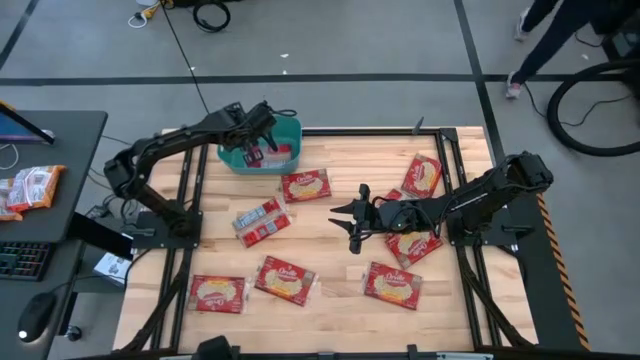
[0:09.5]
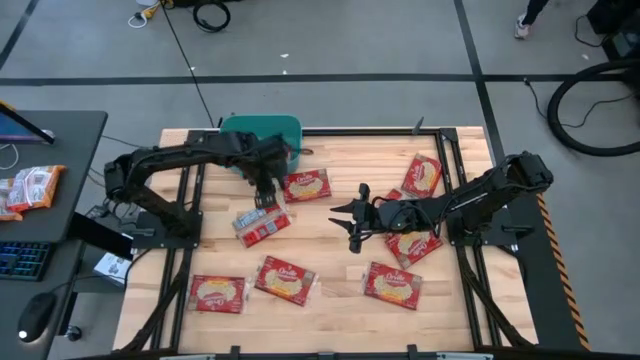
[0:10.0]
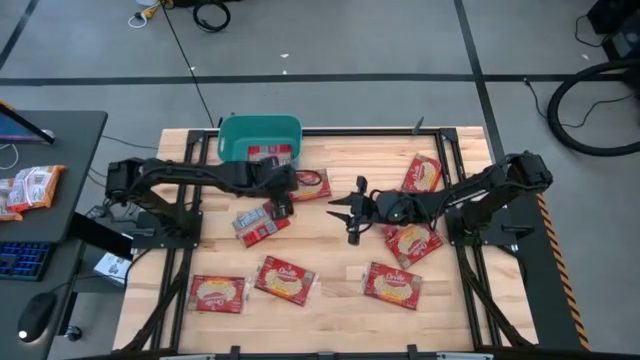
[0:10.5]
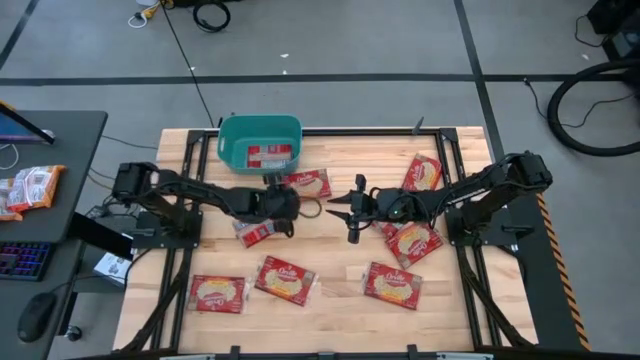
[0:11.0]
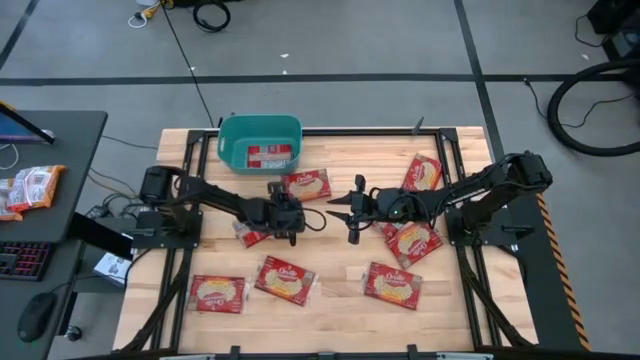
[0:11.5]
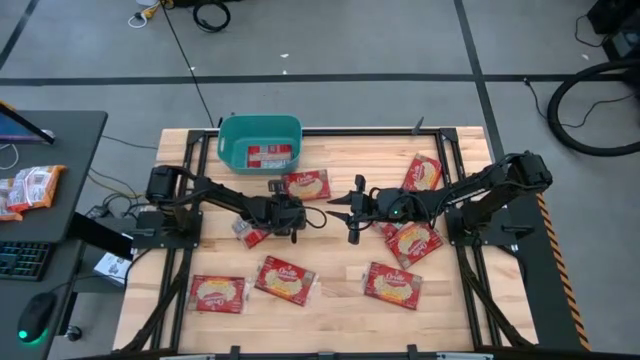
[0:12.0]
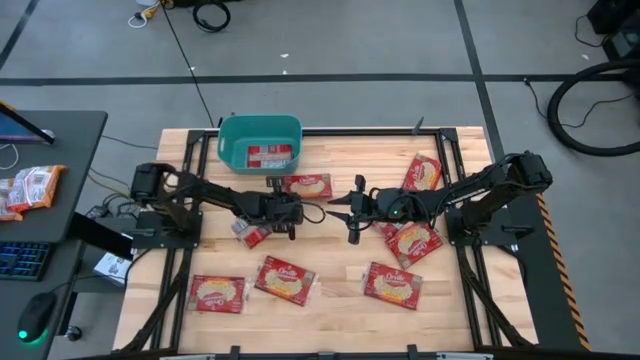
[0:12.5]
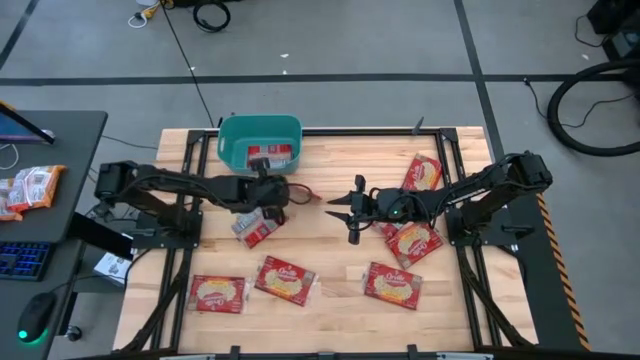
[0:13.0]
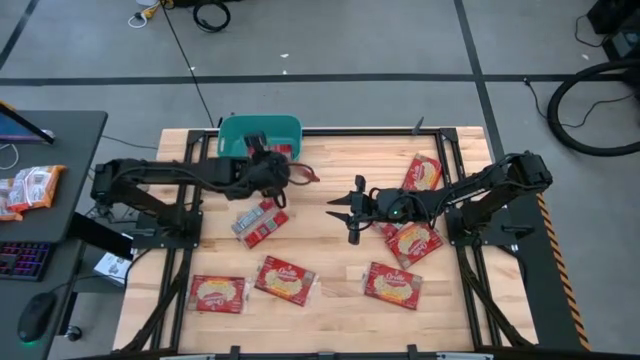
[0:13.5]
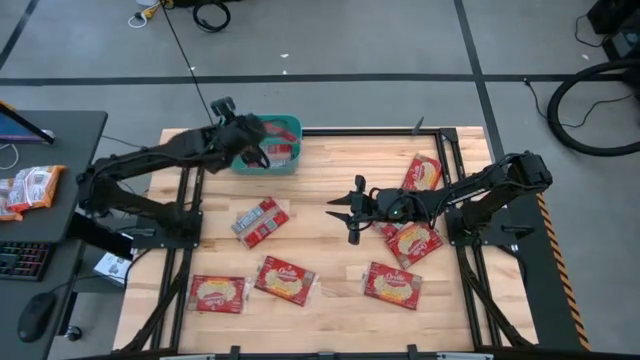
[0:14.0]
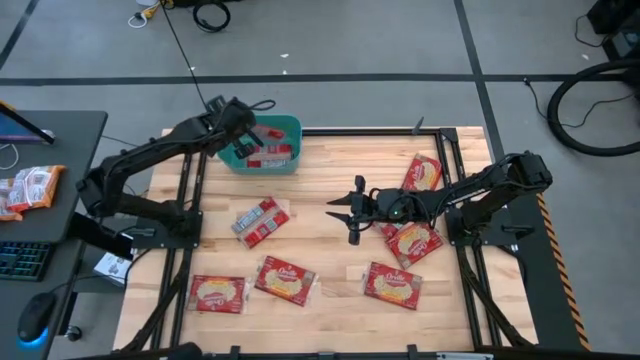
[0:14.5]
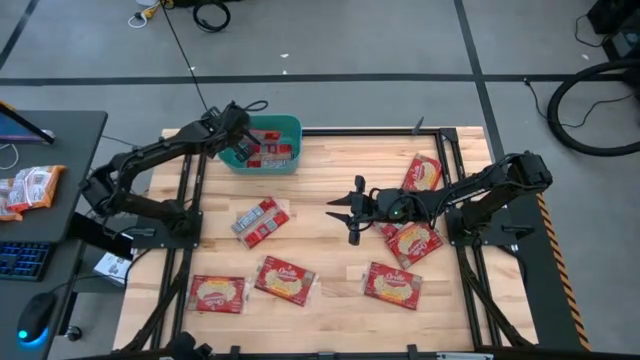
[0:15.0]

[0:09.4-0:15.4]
Task: Sort popcorn bags into baskets
Put the popcorn bag into the bin

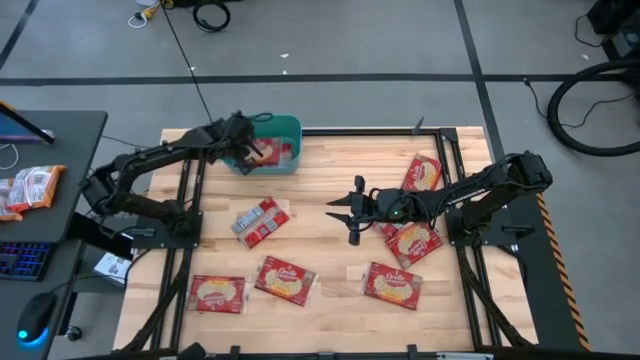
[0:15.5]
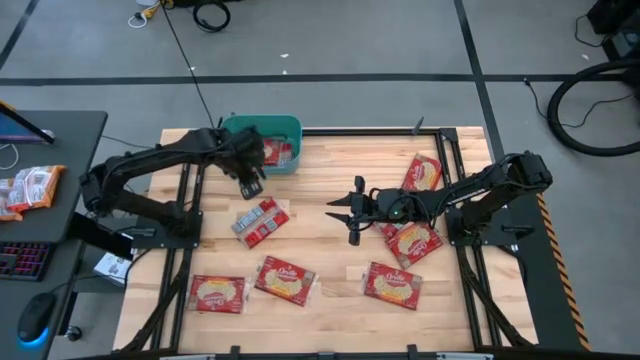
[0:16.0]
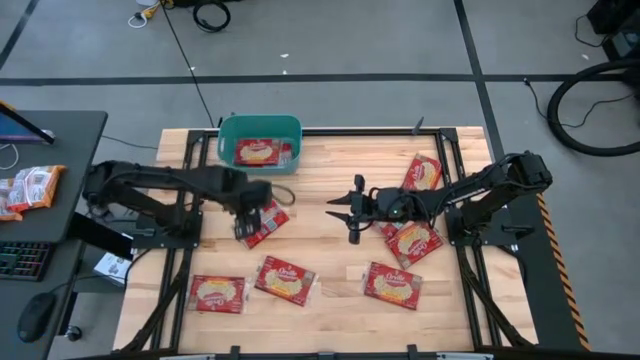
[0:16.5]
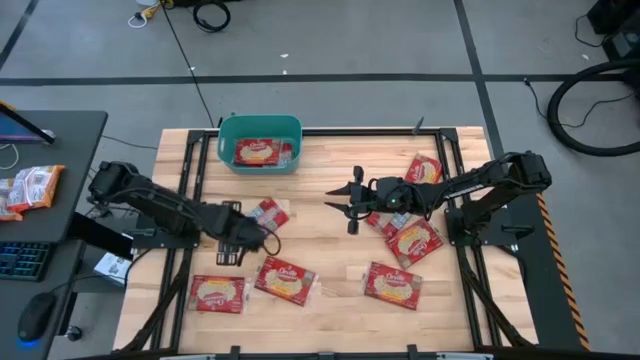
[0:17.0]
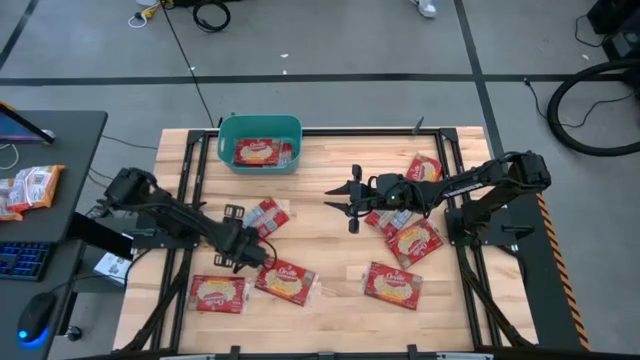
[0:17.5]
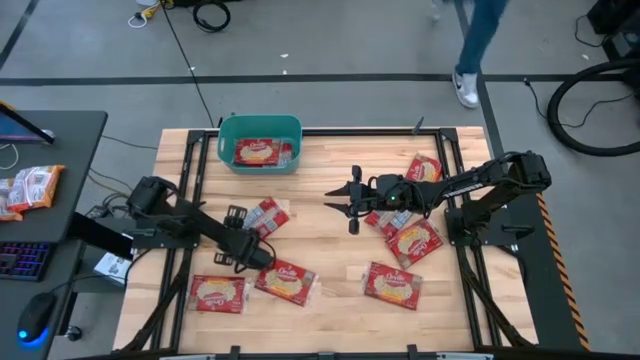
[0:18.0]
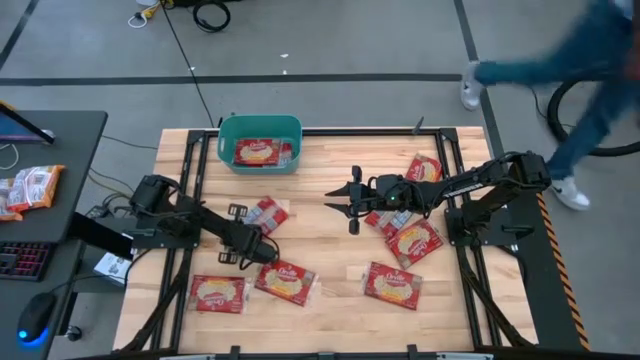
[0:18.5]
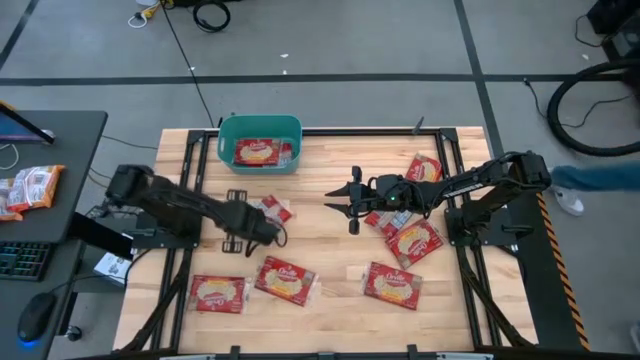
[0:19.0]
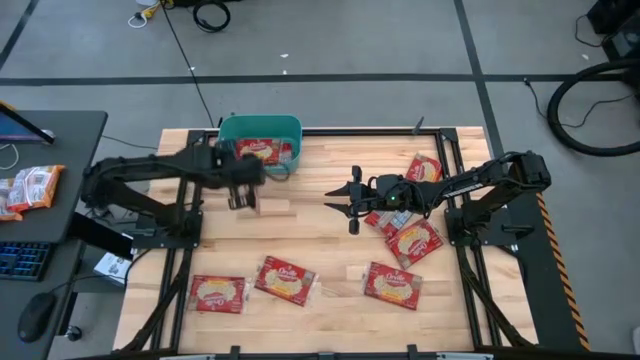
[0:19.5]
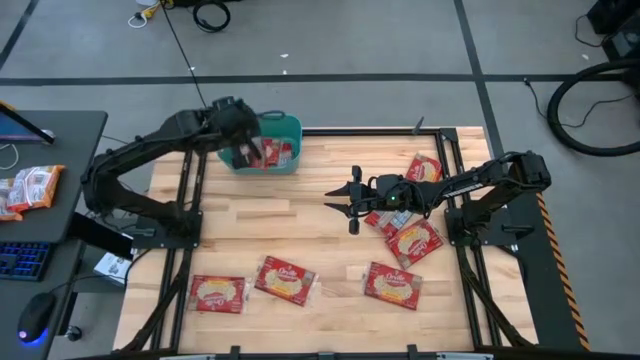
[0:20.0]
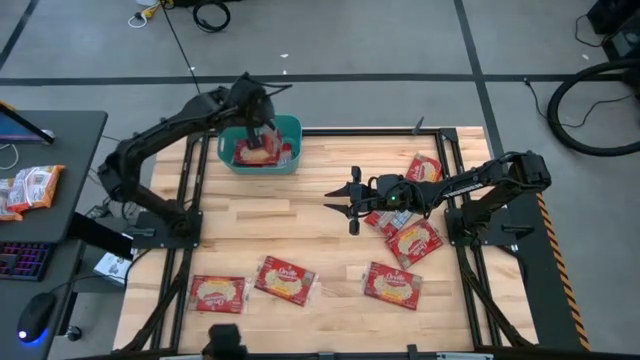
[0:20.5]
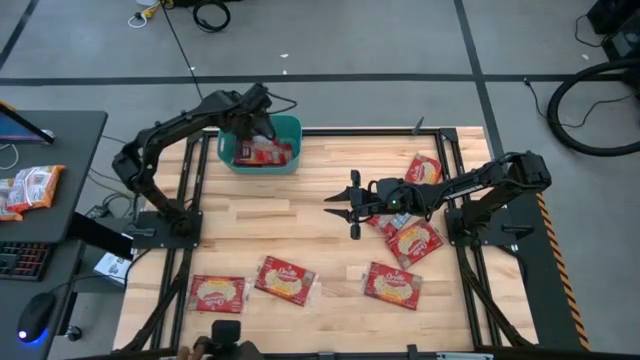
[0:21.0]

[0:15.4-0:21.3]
Put the popcorn bag into the bin

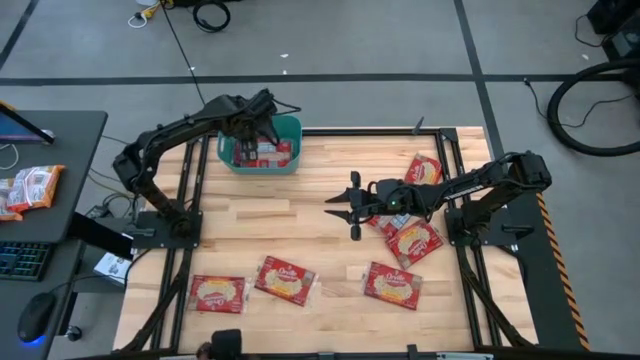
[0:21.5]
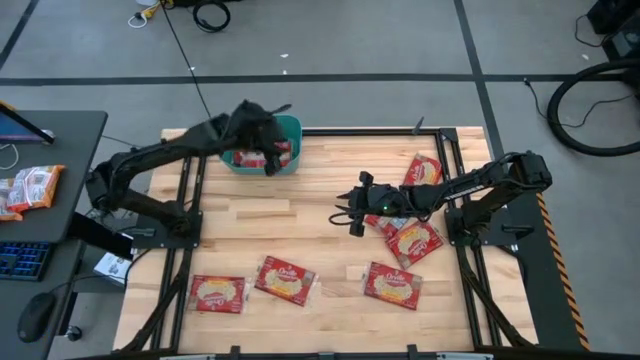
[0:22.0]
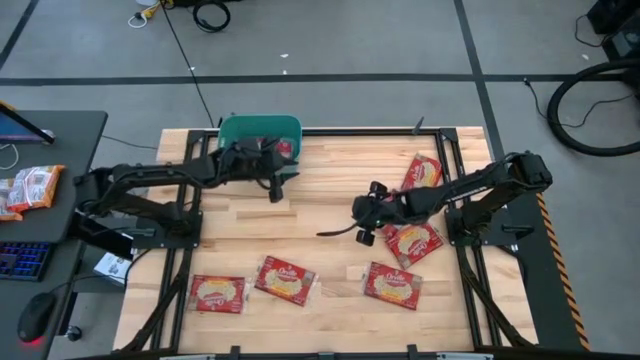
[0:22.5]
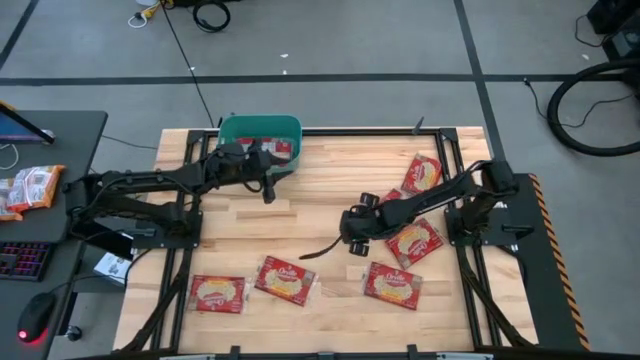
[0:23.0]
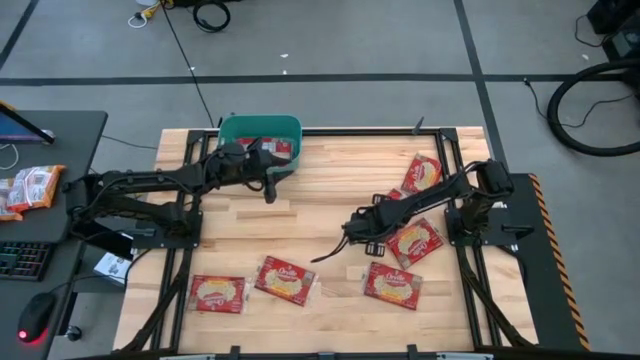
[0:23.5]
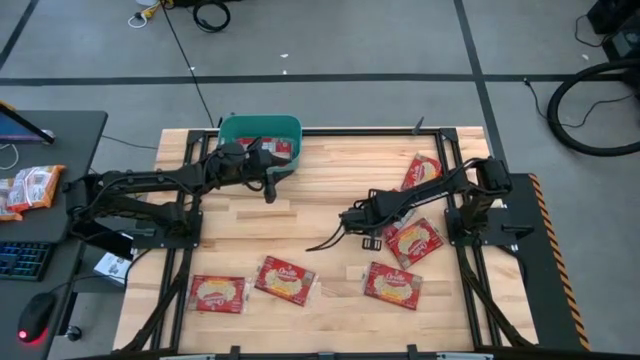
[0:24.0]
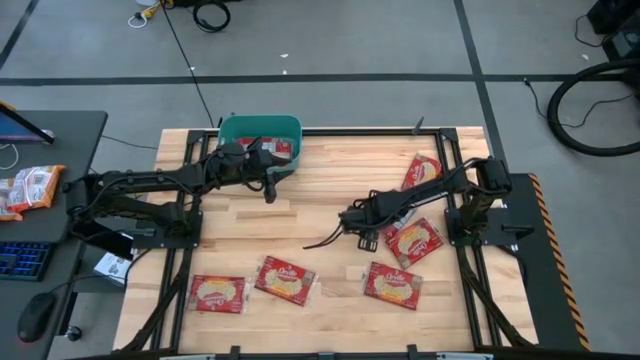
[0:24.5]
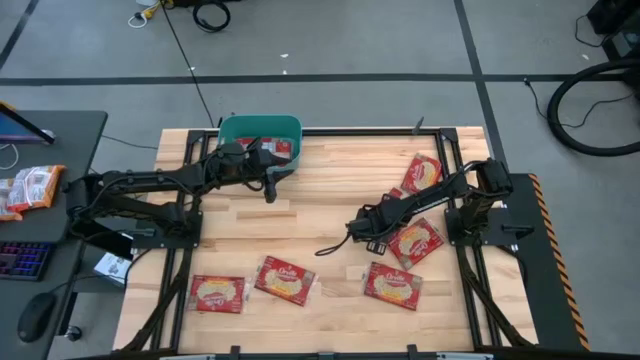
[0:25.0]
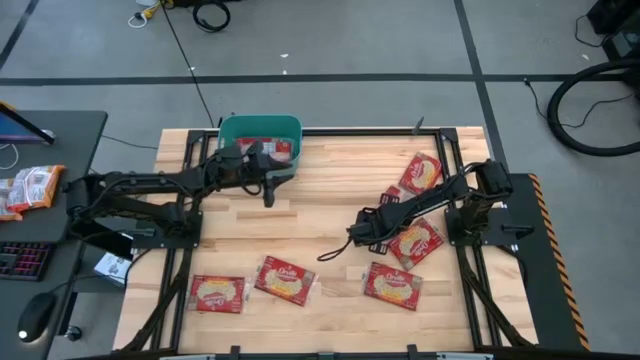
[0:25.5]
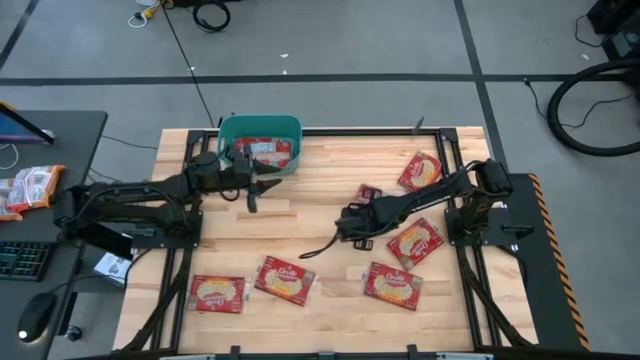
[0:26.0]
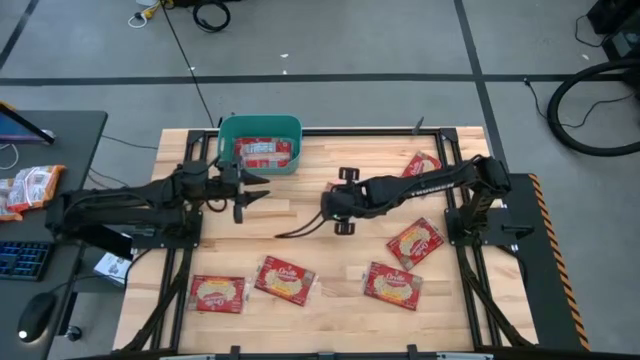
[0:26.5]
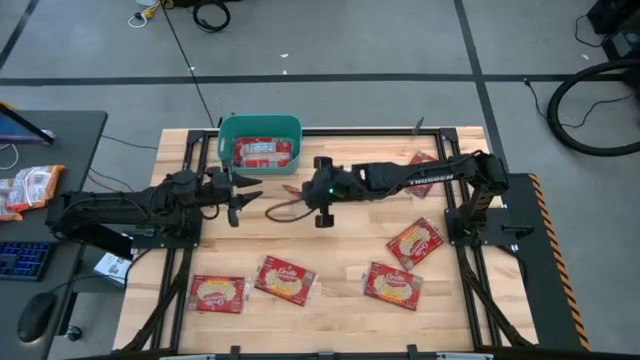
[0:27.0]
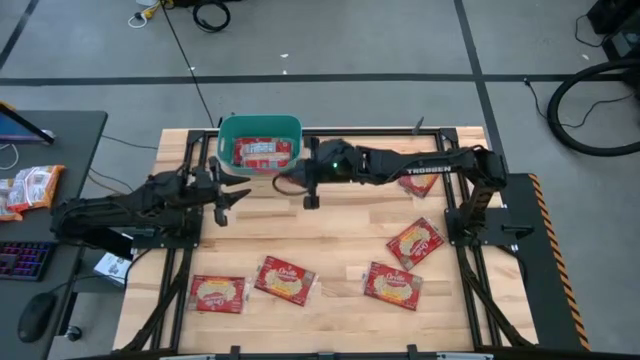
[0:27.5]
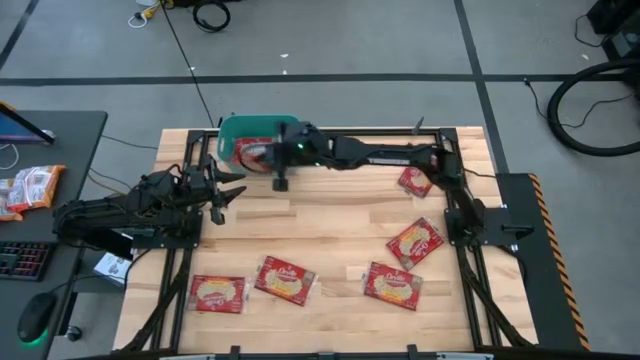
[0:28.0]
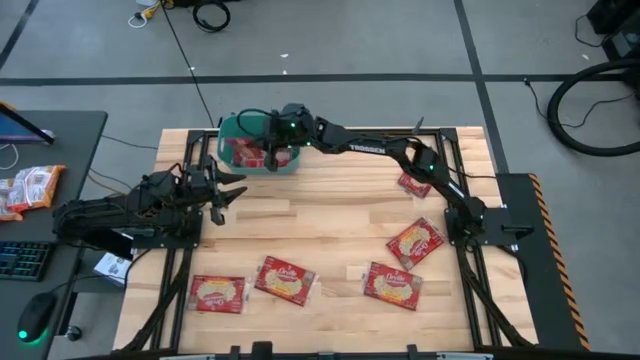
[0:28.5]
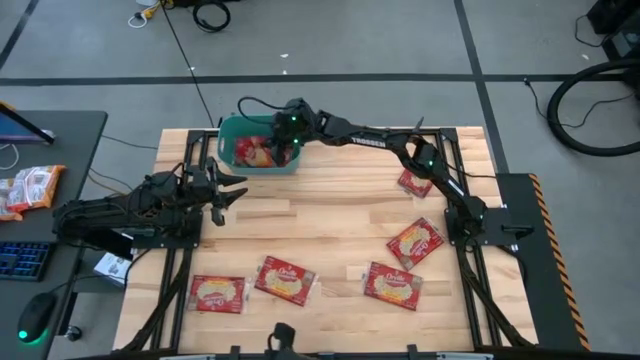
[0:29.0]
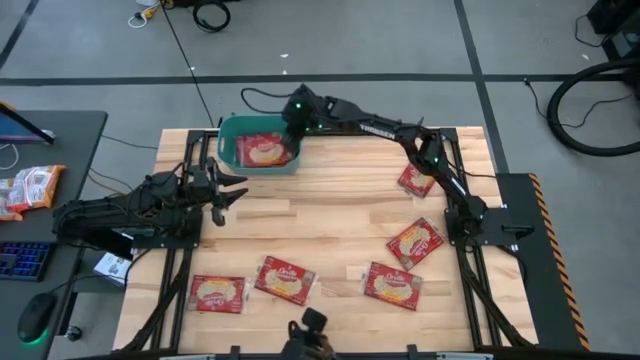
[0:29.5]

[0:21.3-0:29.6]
Put the popcorn bag into the bin

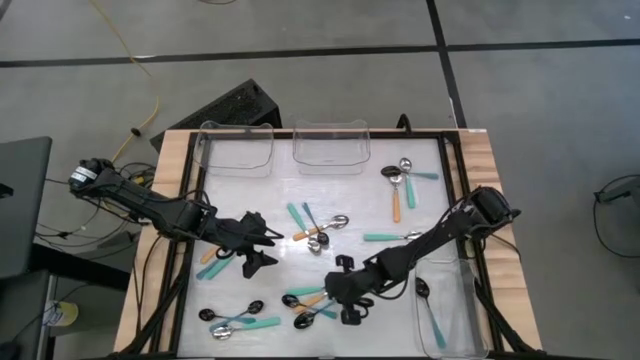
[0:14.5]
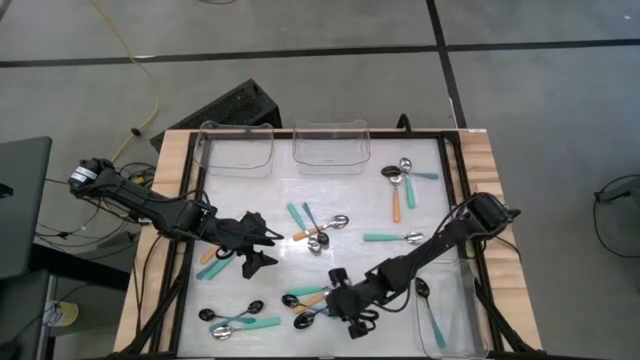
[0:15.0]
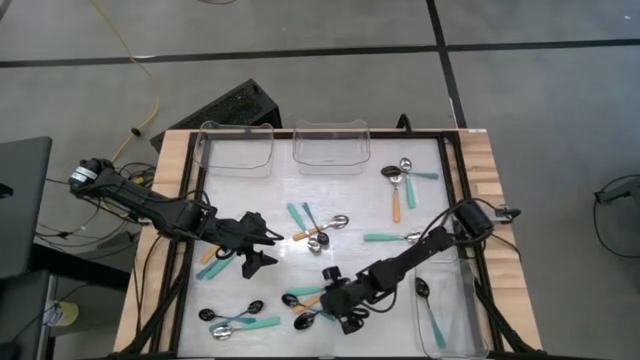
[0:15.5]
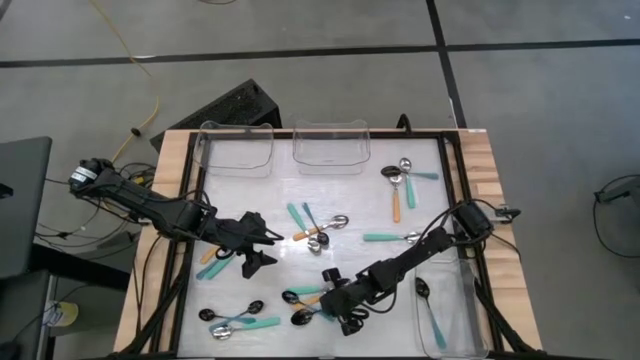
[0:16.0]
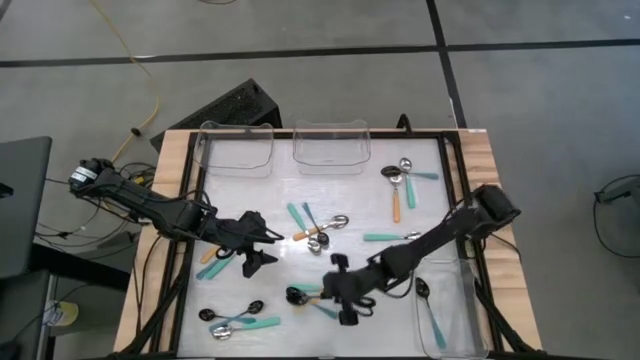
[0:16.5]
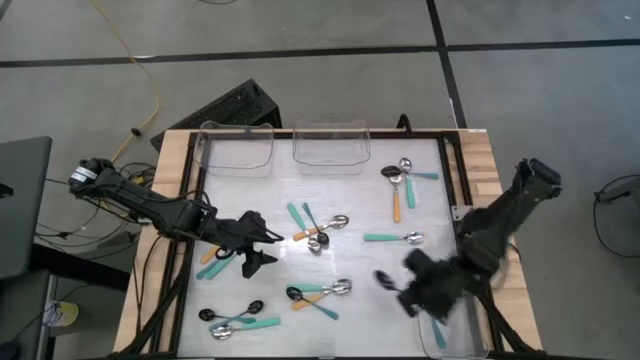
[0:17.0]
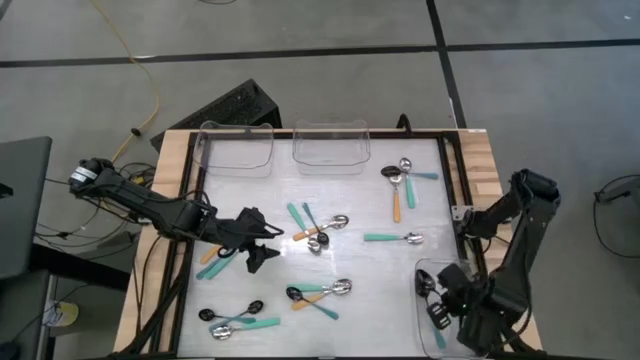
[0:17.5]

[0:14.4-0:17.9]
Task: Sort silverware by color (type)
Put the blue spoon into the bottom transparent bin
